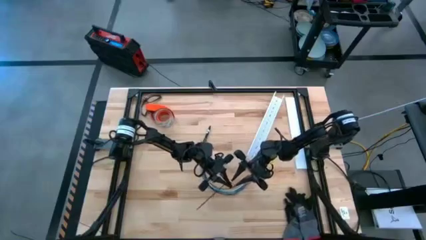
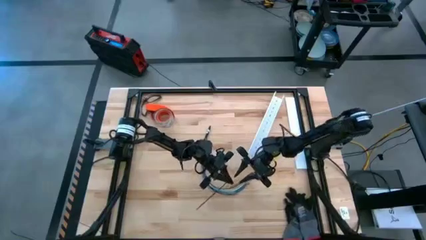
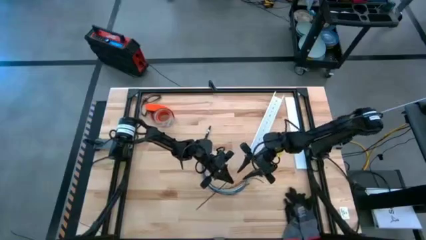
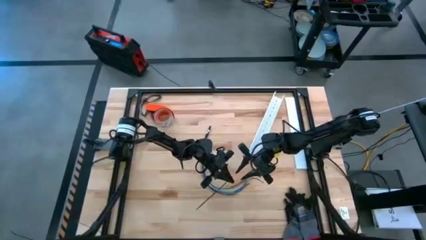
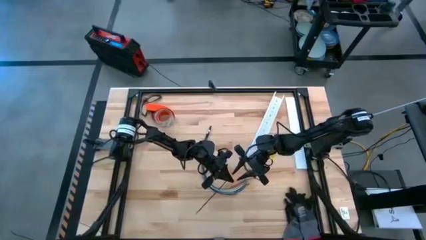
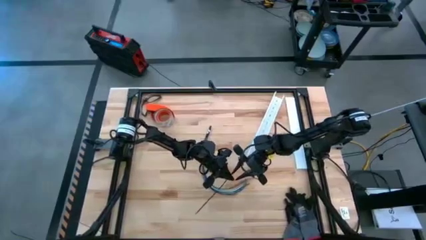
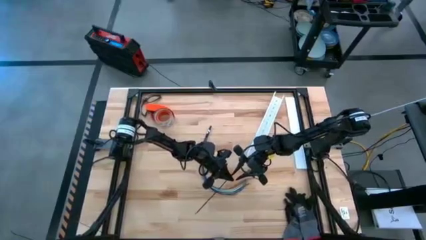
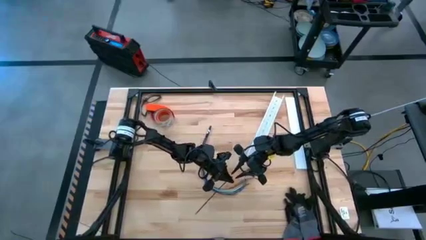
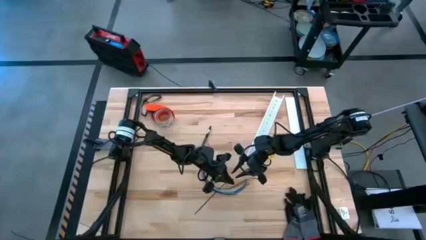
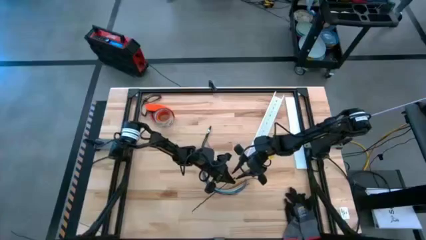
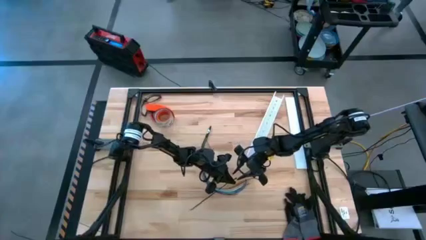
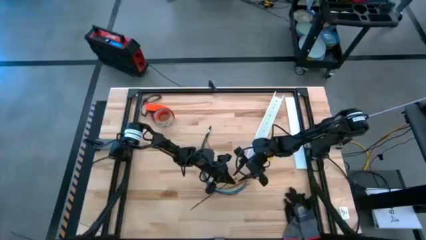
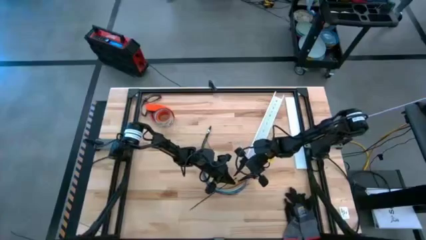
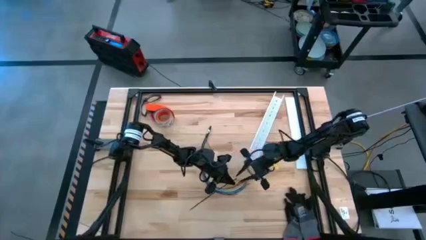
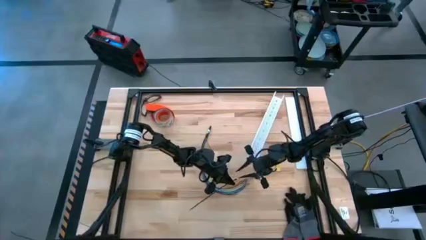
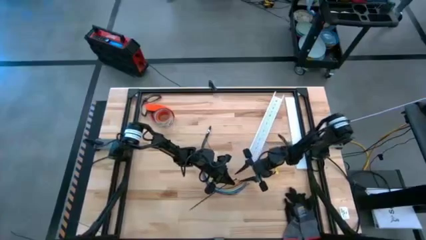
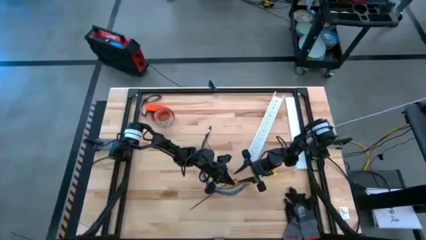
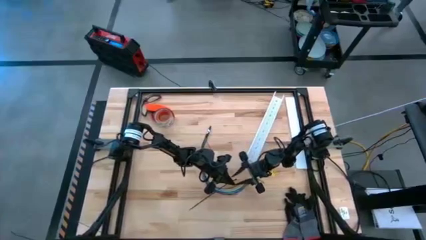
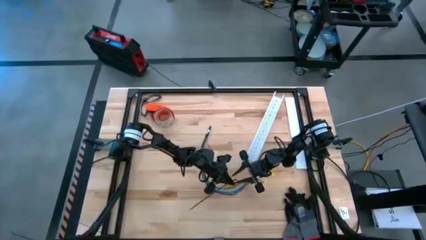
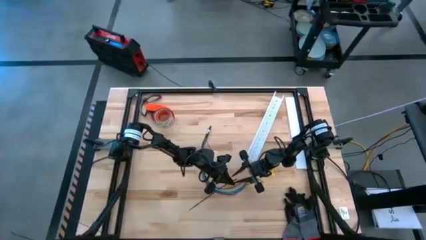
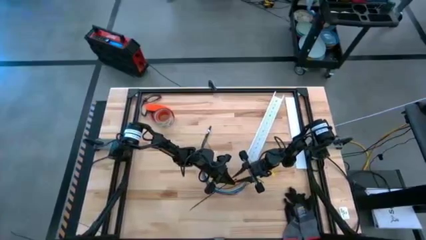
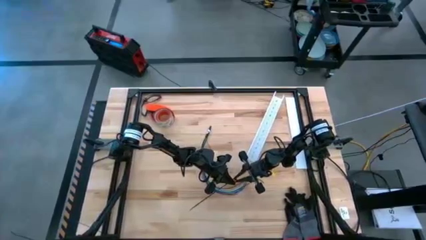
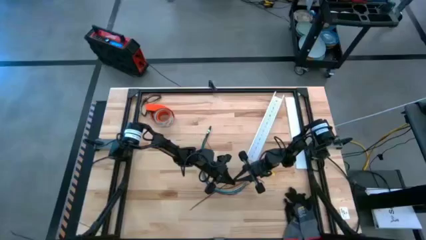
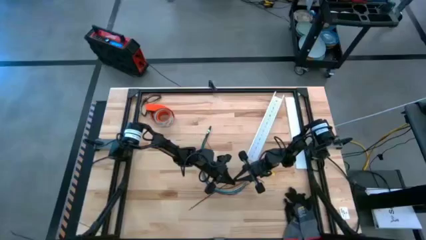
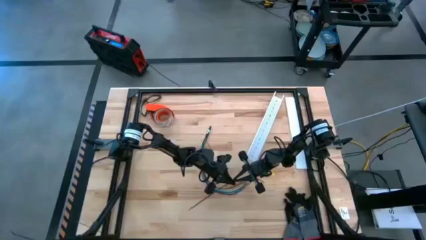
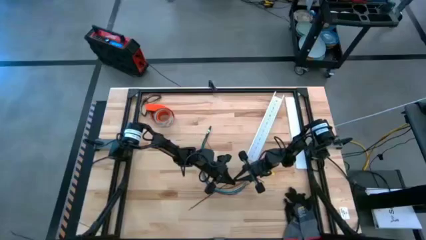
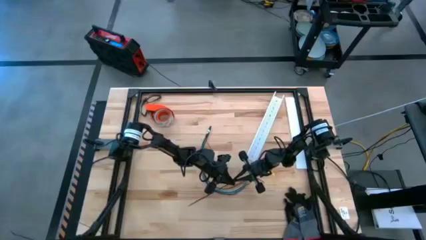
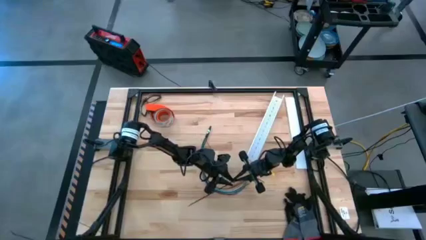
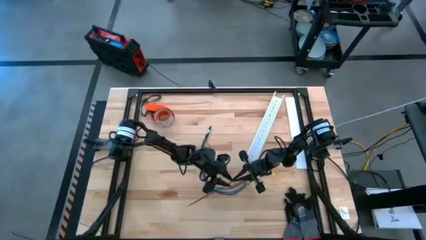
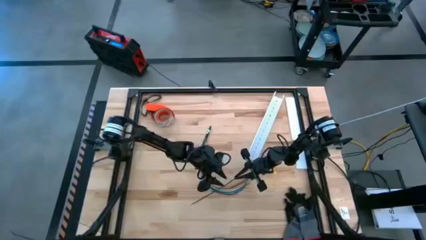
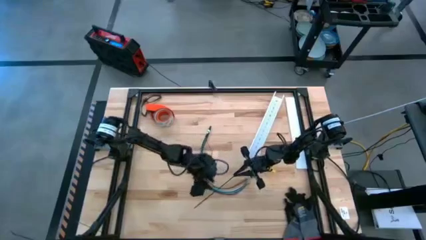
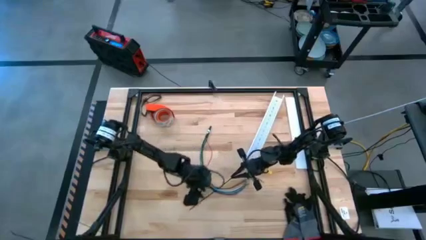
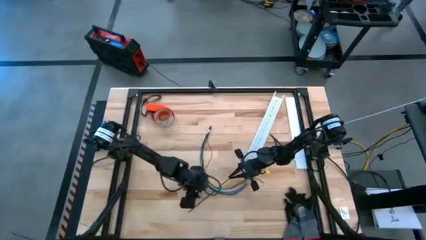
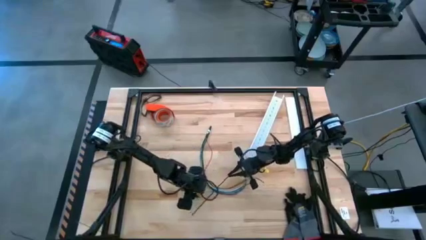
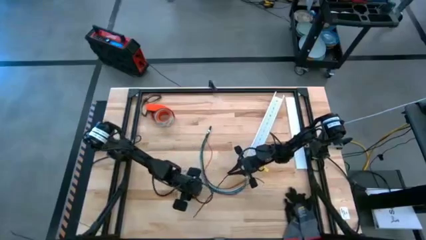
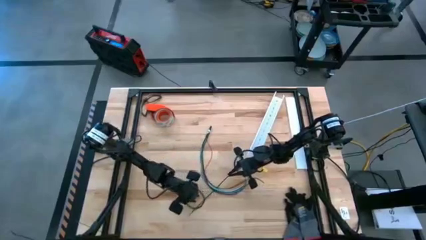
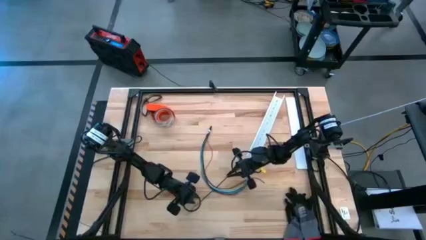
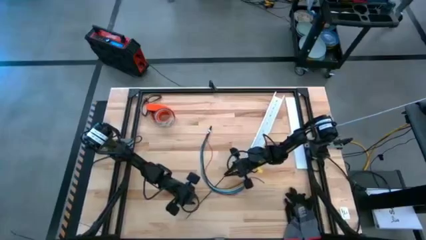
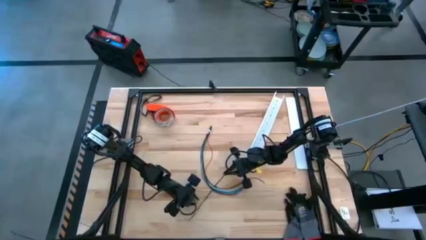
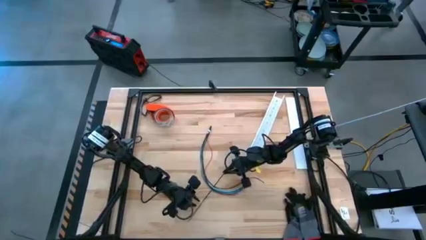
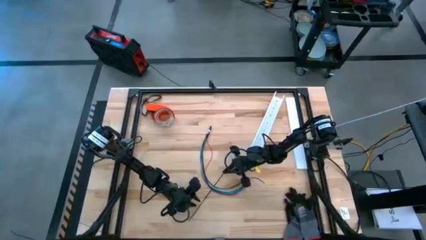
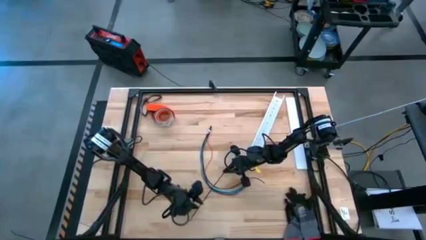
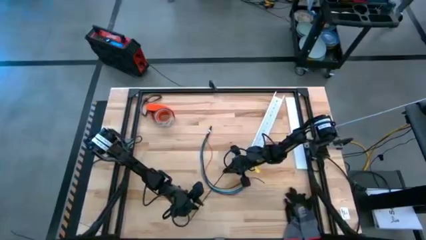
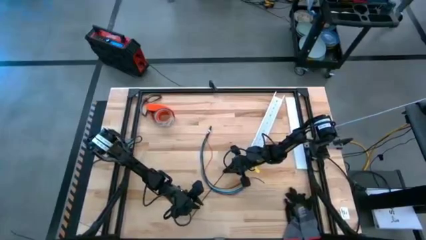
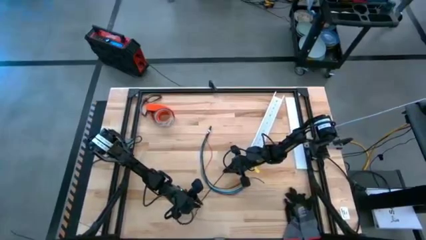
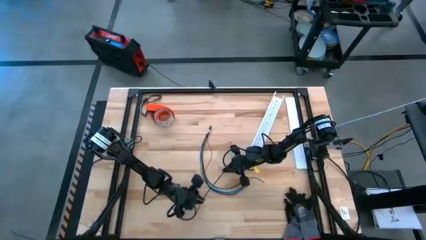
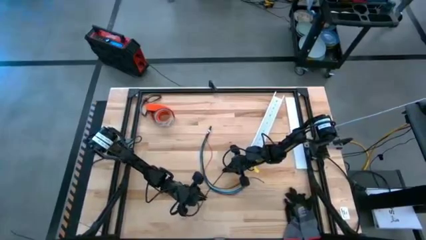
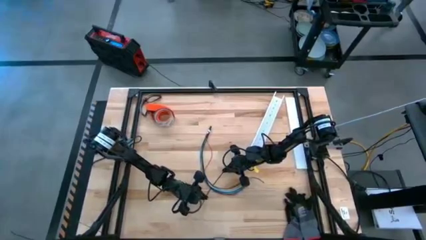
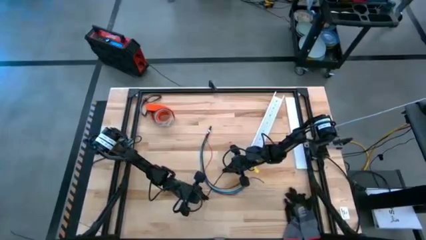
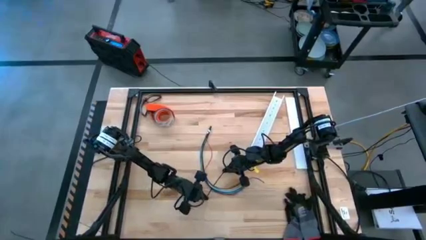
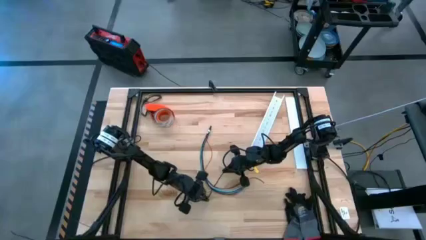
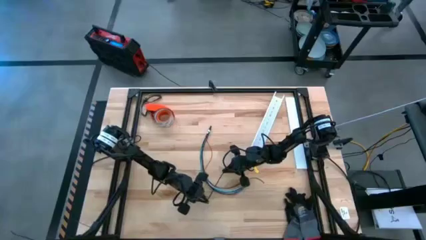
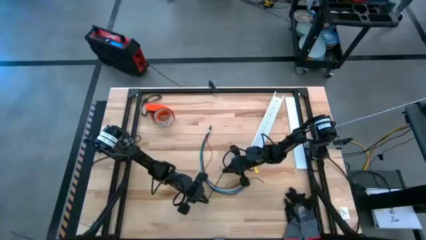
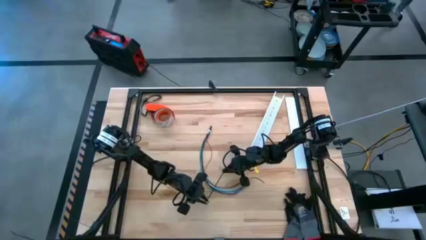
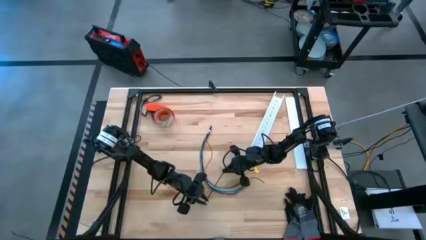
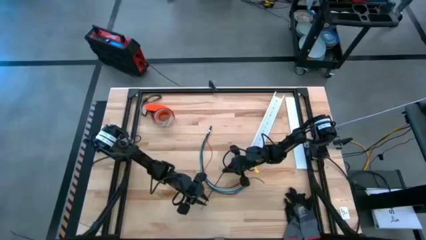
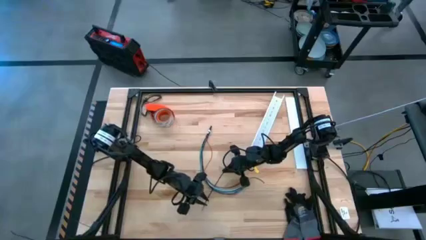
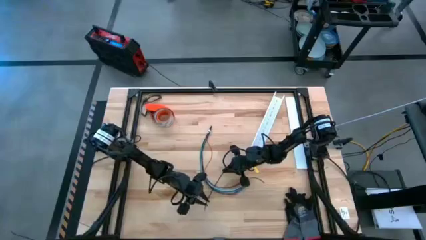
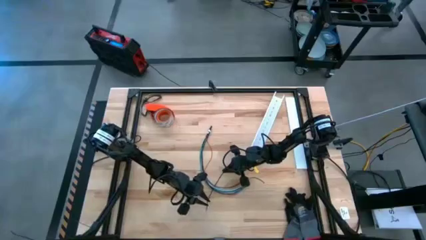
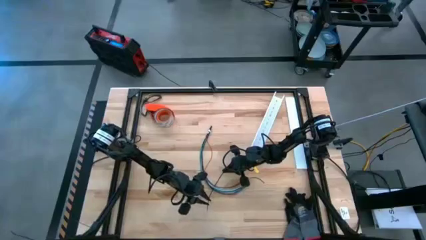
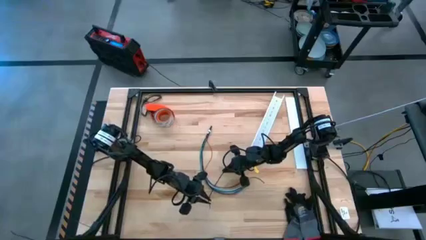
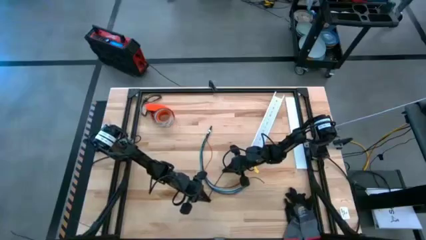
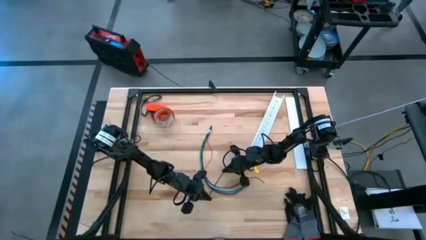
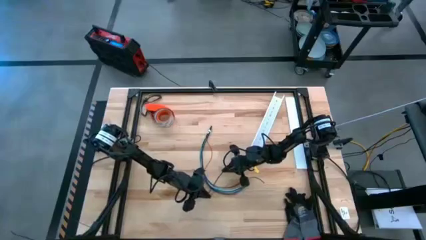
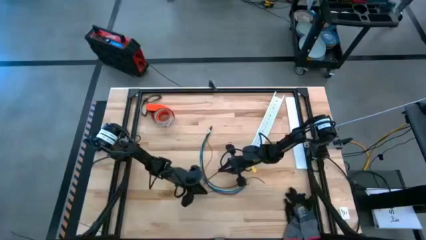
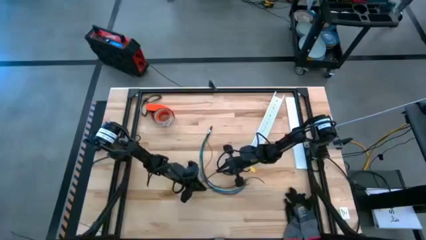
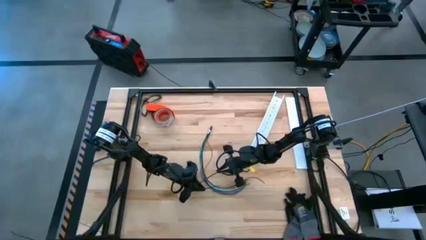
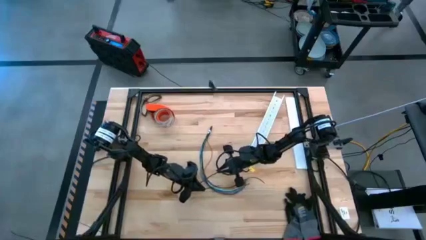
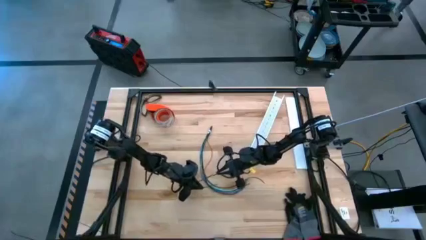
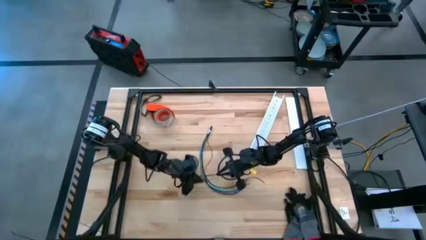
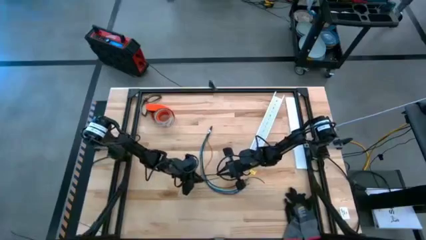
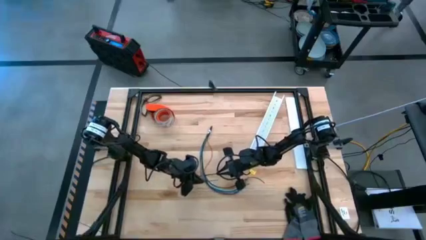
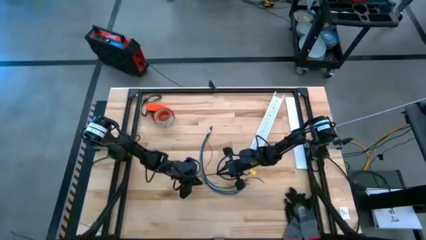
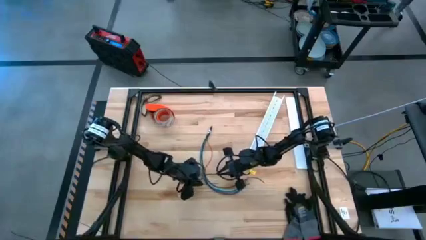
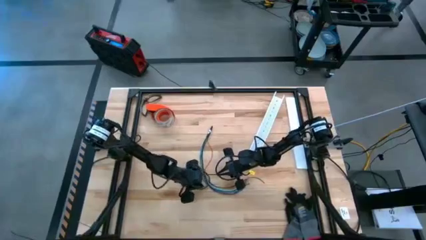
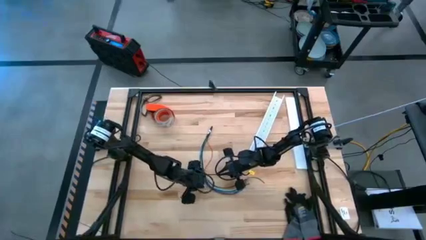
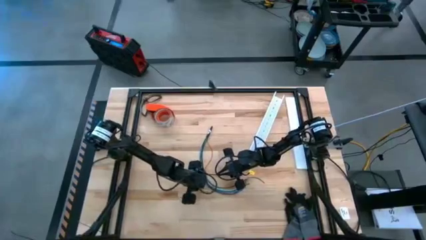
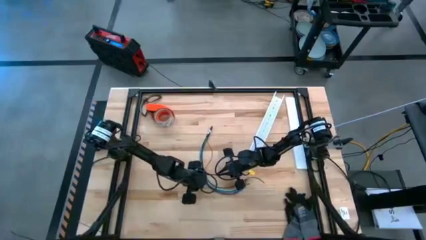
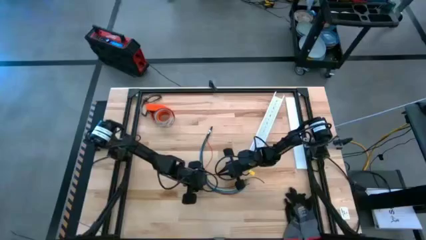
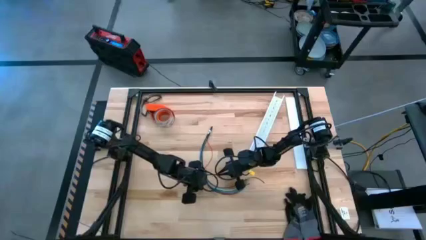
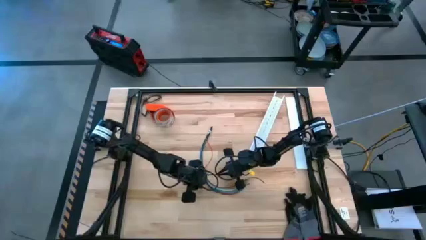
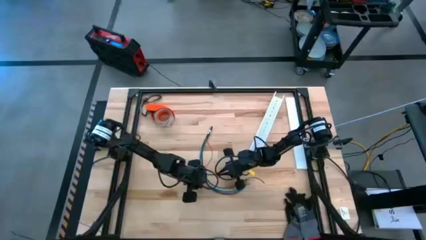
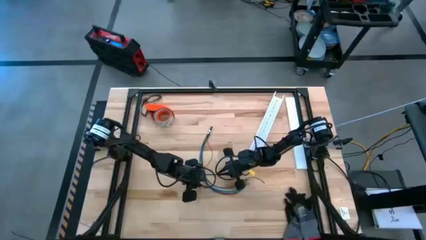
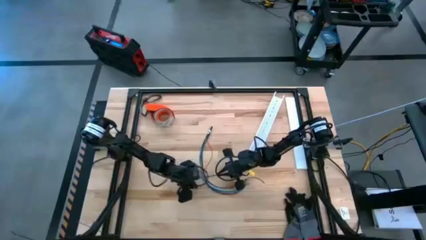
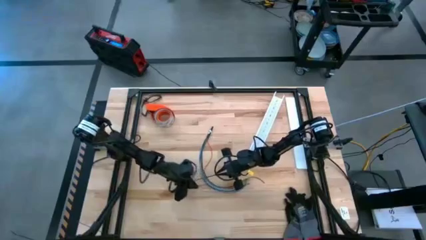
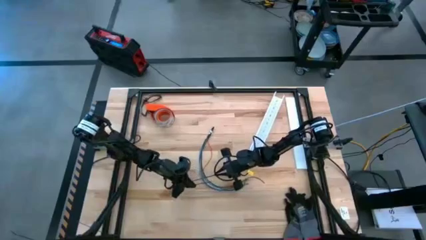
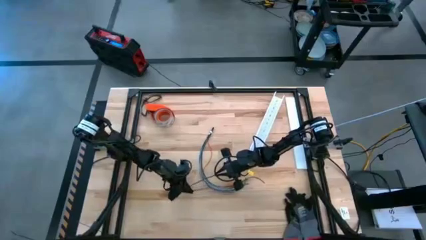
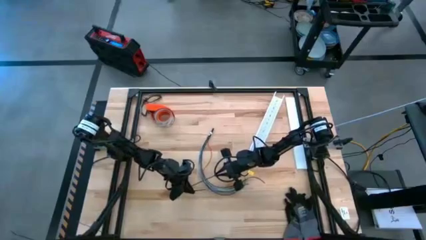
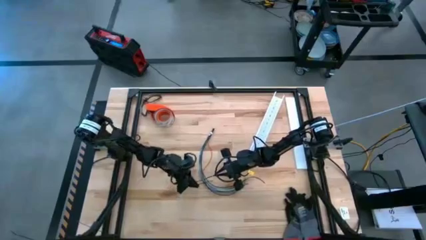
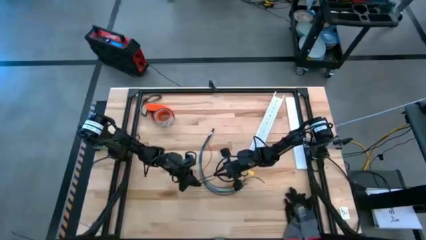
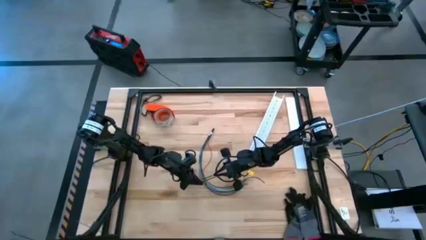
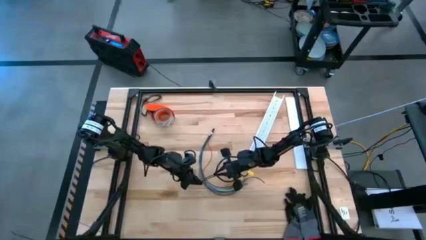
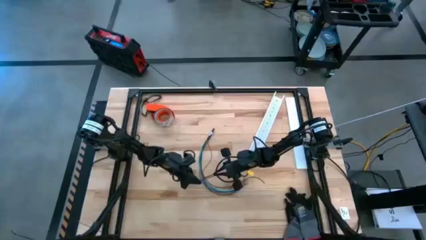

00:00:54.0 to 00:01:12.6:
Task: Ziptie cables
Wrap the cables together using a black zip tie
